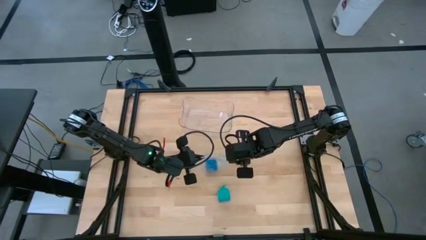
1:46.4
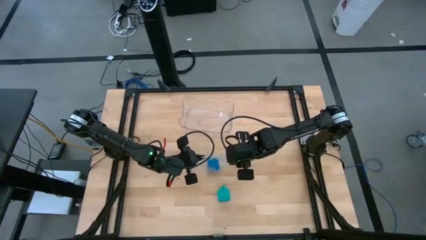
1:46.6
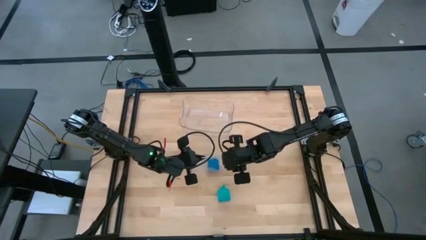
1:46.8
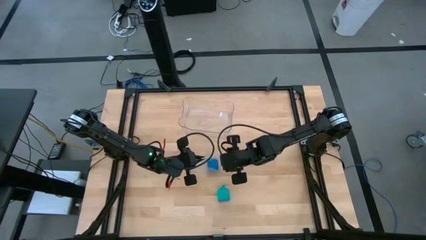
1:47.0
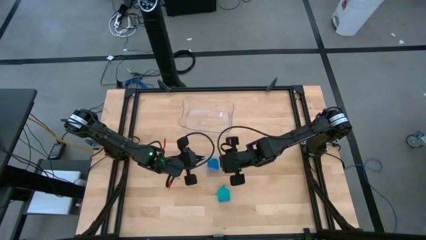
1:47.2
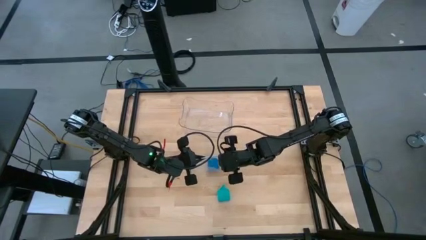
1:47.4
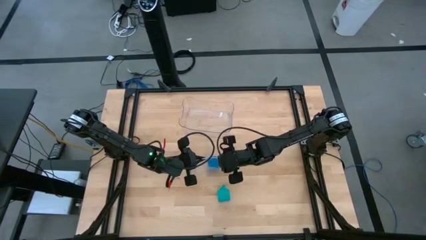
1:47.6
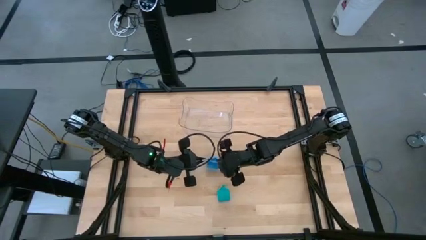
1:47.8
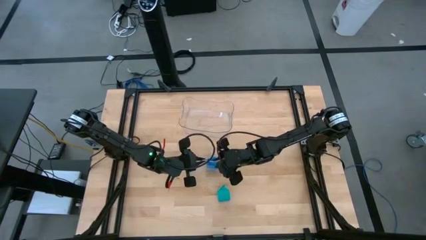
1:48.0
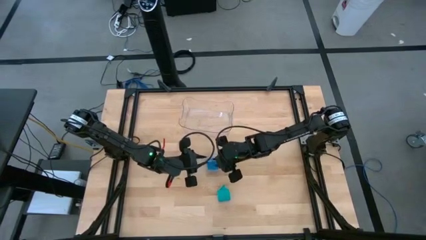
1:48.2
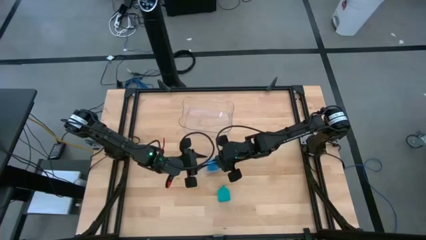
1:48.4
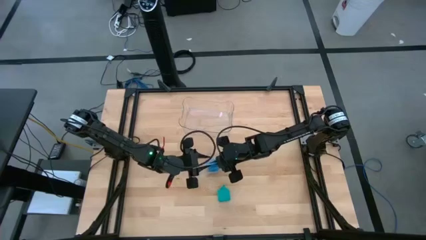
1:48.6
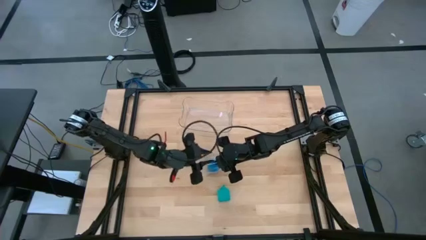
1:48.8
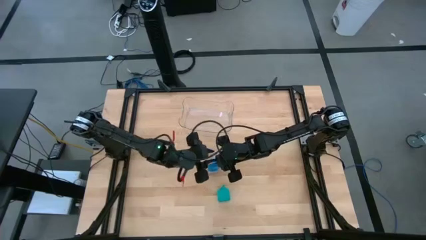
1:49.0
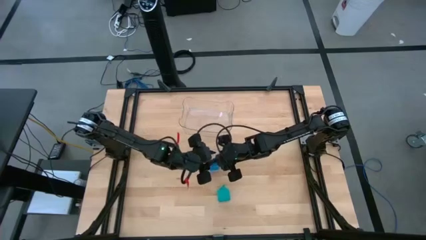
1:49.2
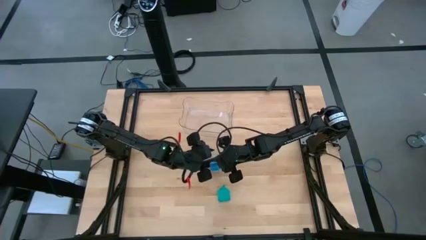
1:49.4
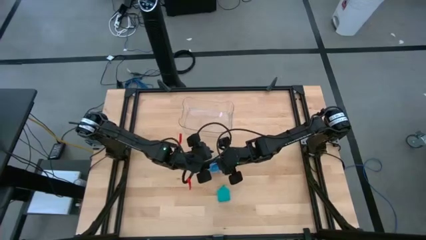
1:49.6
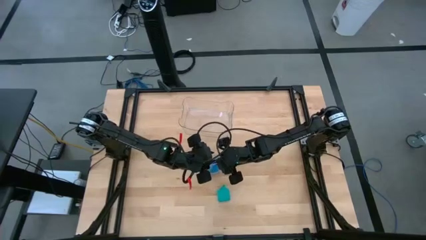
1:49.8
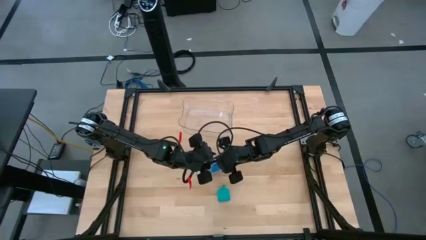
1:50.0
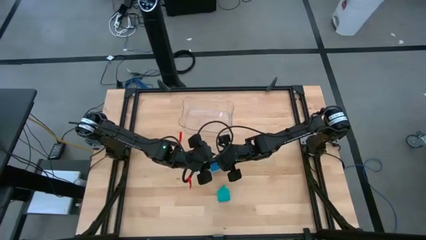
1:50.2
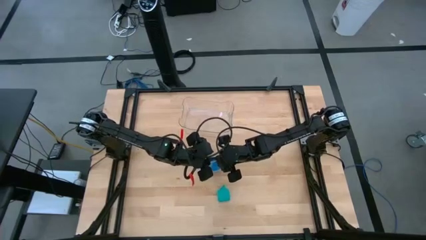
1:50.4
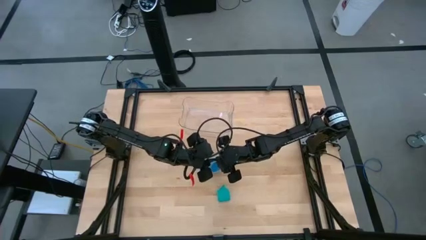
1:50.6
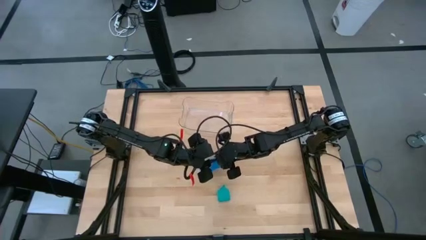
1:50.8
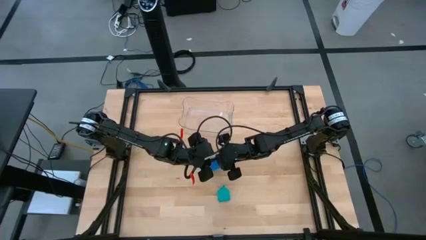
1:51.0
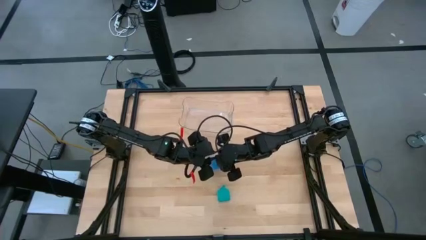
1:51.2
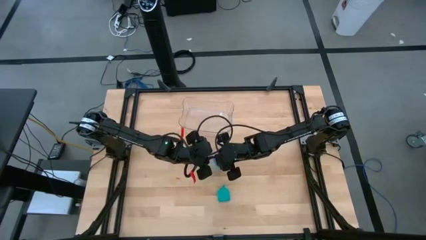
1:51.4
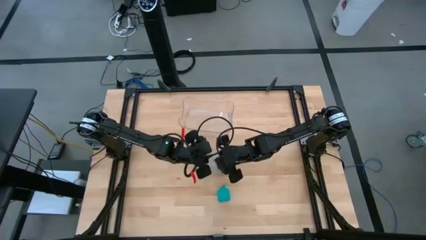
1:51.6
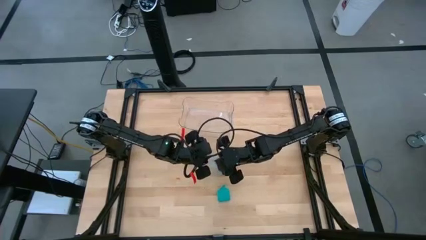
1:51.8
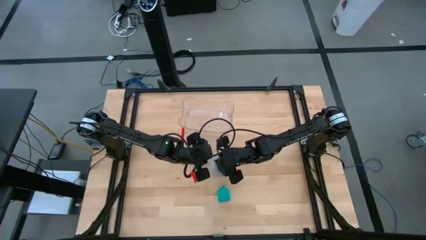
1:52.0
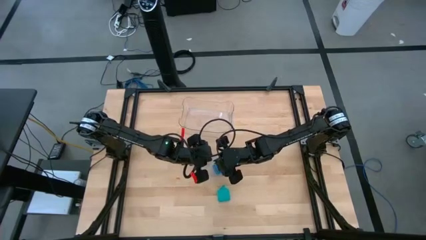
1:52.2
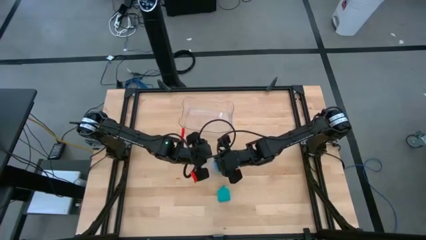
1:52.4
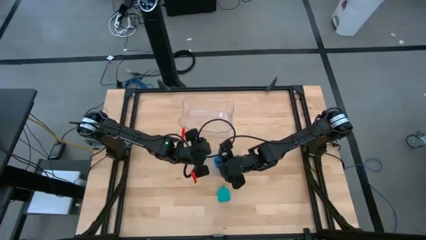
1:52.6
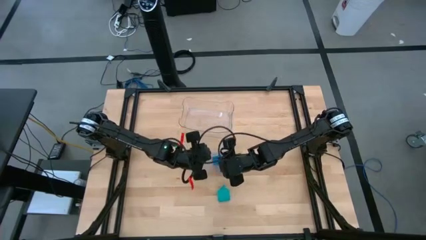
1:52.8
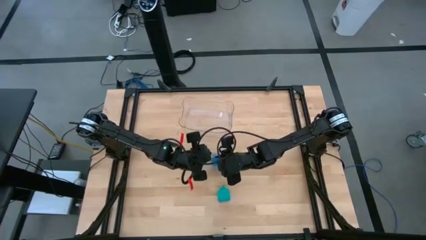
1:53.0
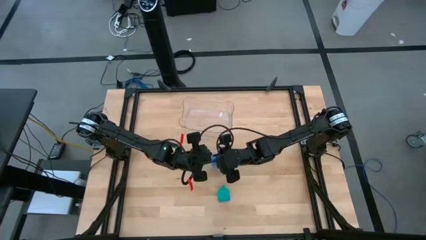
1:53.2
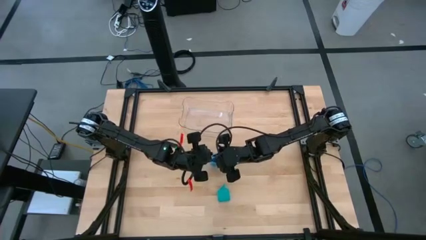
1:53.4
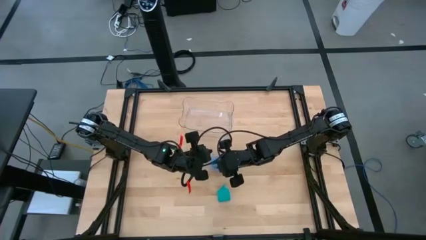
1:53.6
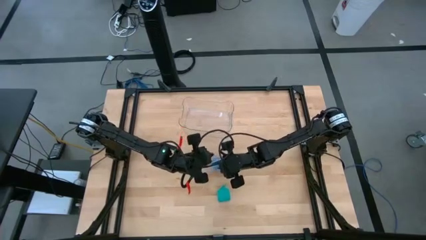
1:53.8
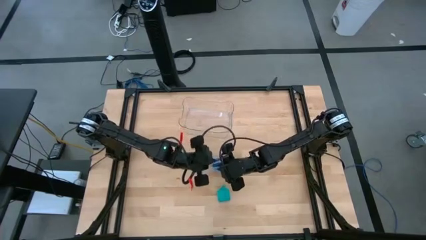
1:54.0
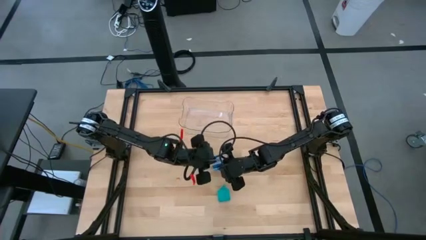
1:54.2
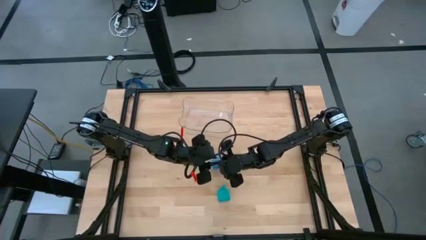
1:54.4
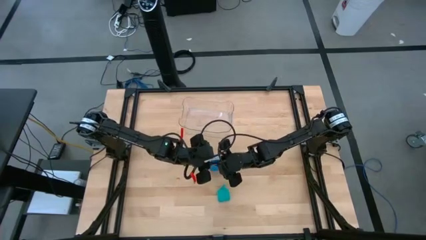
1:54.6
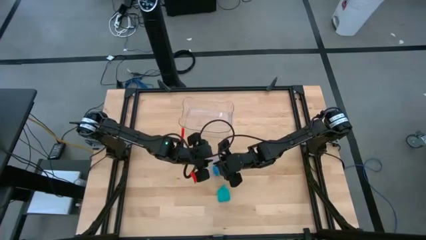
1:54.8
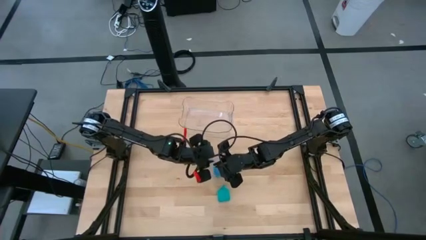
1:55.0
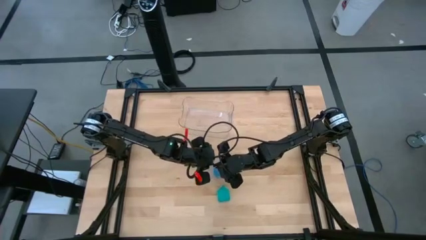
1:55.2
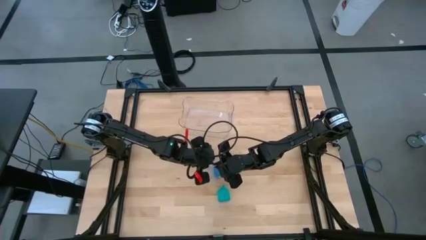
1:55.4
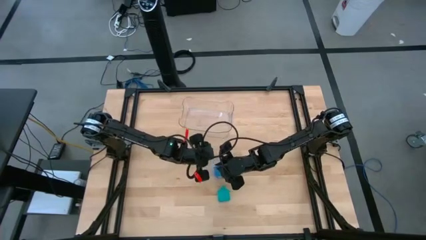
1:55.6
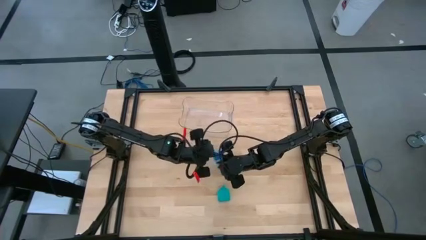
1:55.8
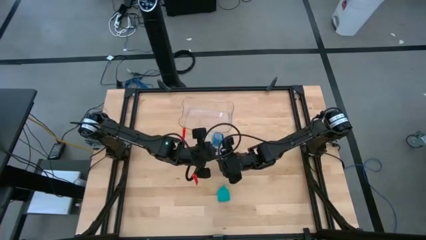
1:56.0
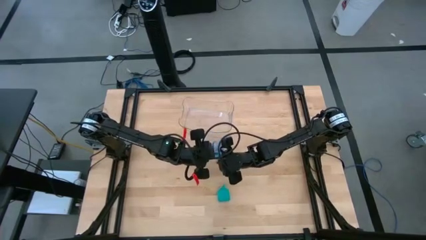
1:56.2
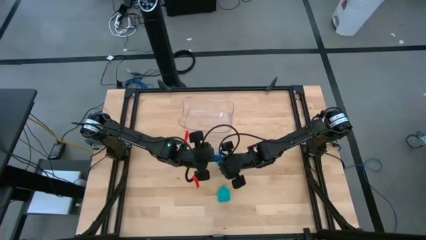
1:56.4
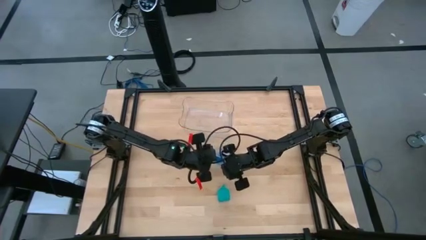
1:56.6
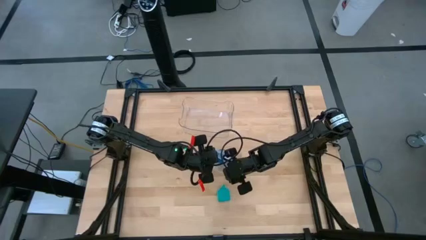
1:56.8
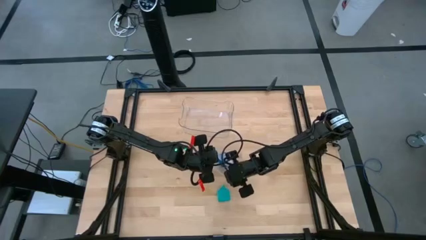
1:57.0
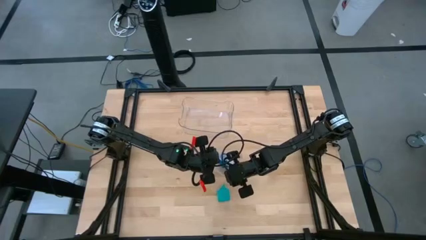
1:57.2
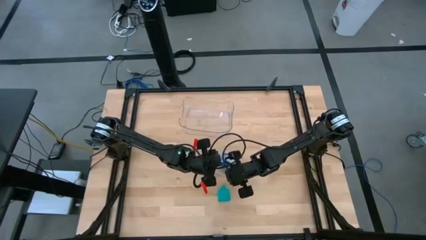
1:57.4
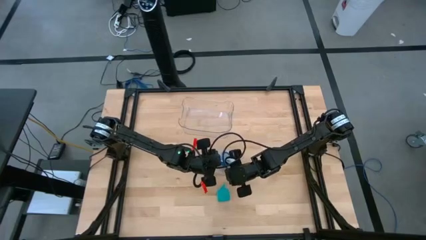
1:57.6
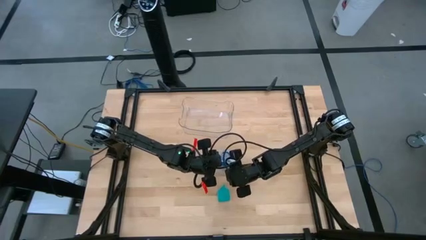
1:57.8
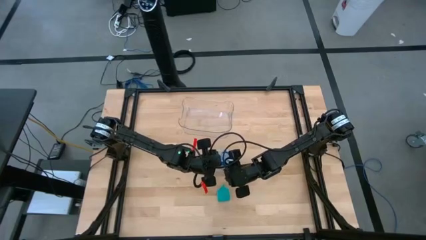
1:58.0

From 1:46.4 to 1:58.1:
Task: Roll bandage
Put the rolled green bandage into the transparent zip bag
